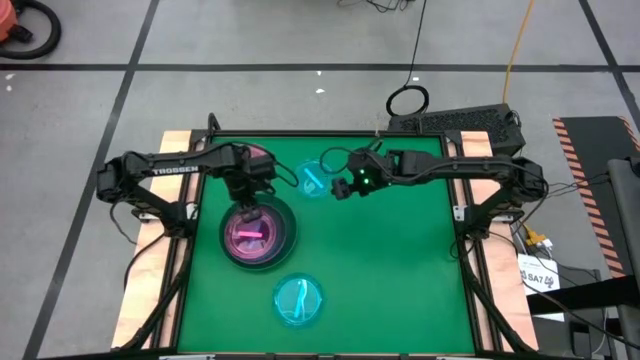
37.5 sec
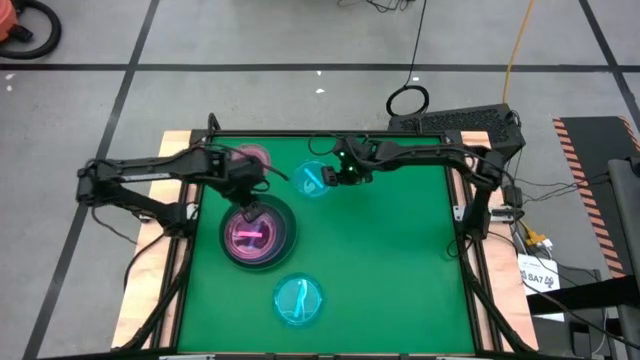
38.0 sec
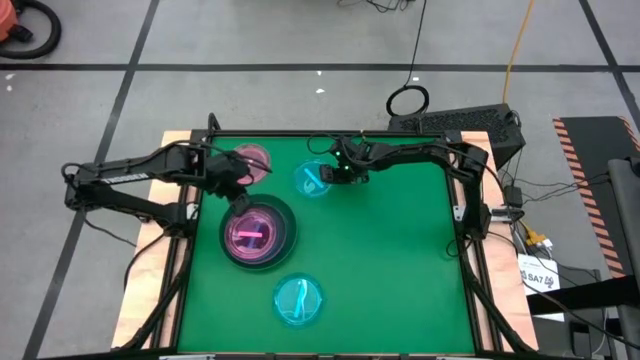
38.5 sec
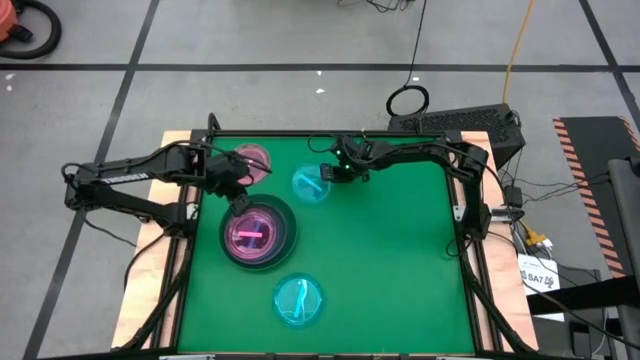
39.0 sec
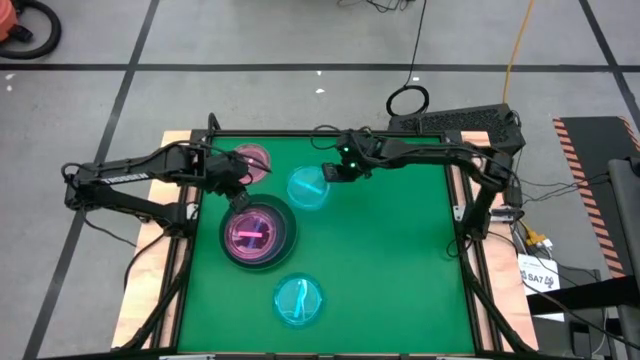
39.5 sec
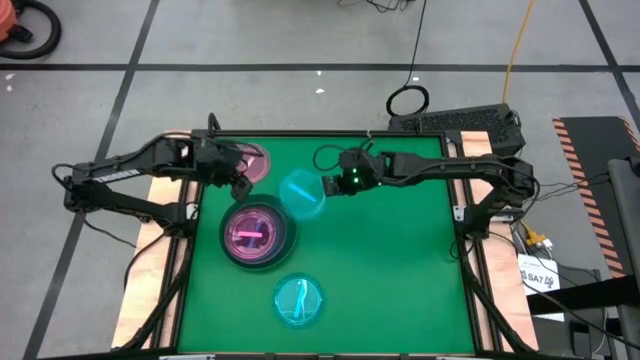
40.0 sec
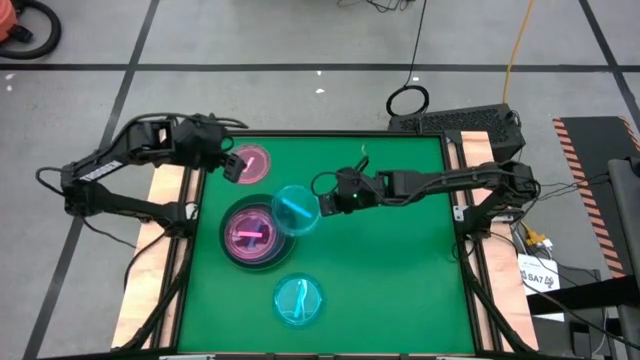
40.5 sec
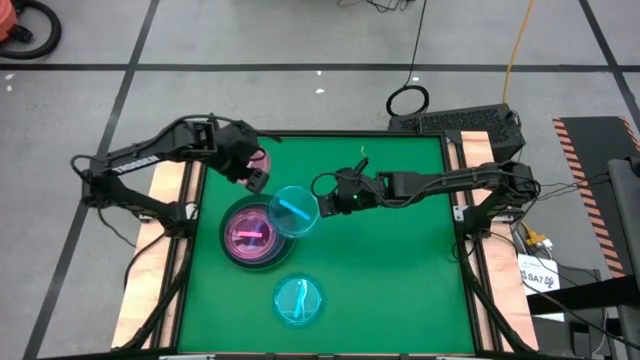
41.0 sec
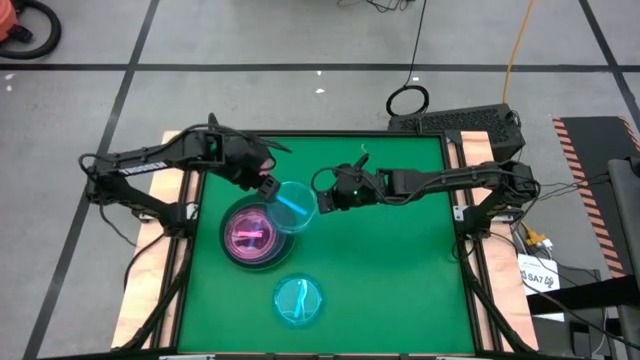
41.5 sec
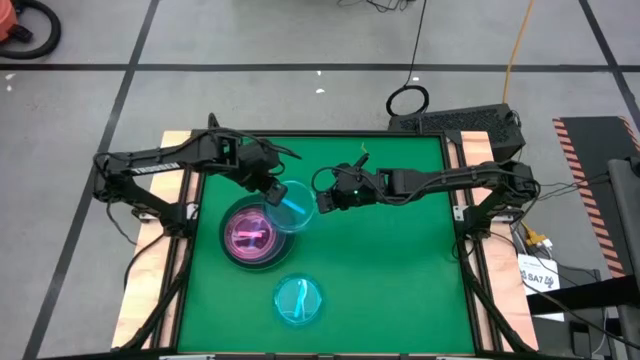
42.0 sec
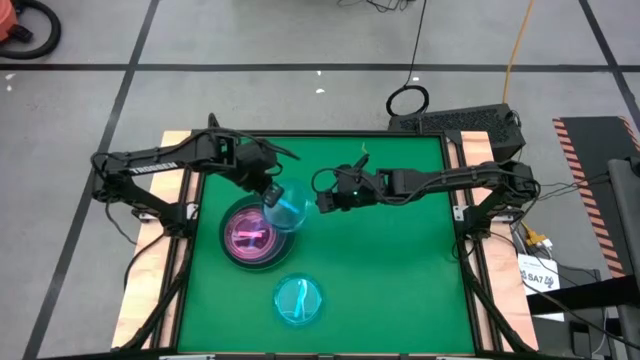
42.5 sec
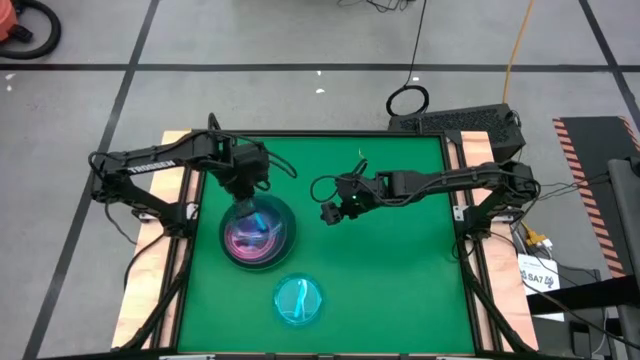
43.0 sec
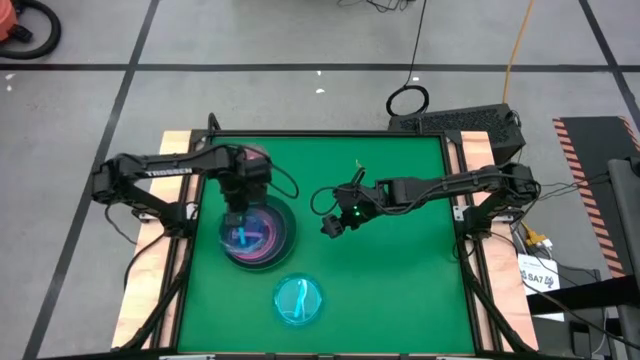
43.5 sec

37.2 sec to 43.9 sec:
Task: Stack plastic plates
Stack the top transparent blue plate on top of the transparent pink plate

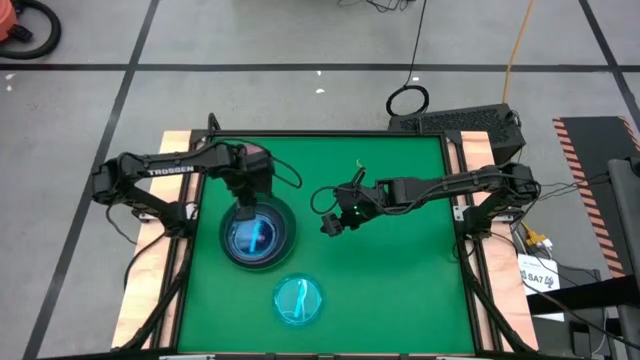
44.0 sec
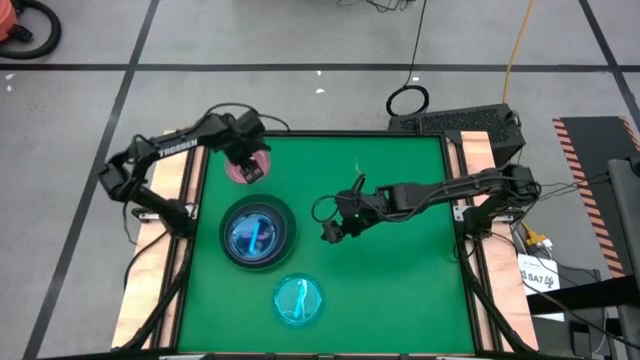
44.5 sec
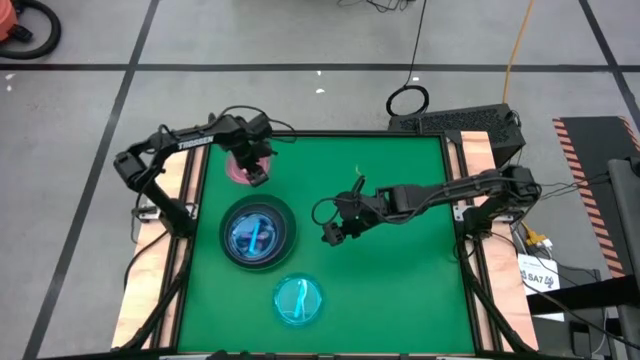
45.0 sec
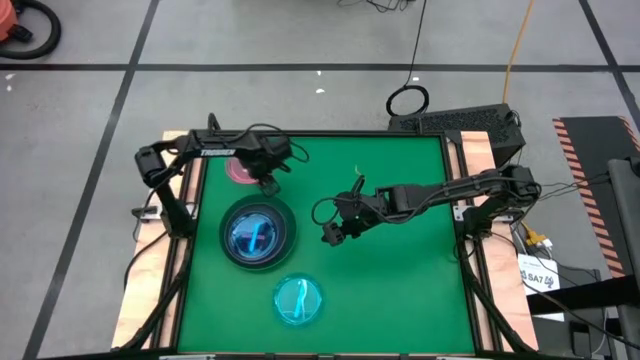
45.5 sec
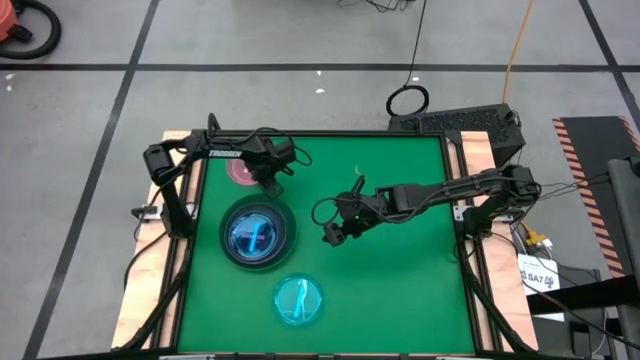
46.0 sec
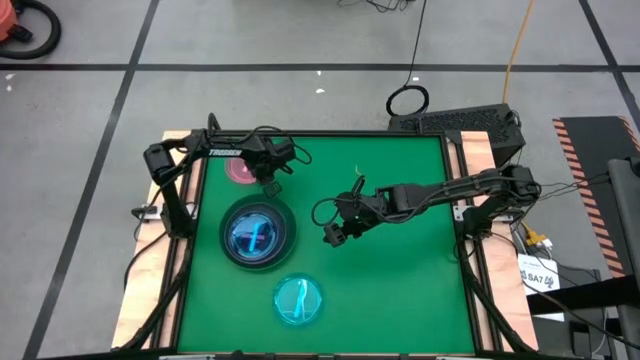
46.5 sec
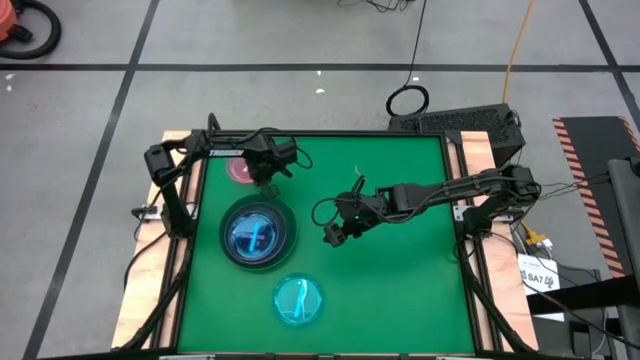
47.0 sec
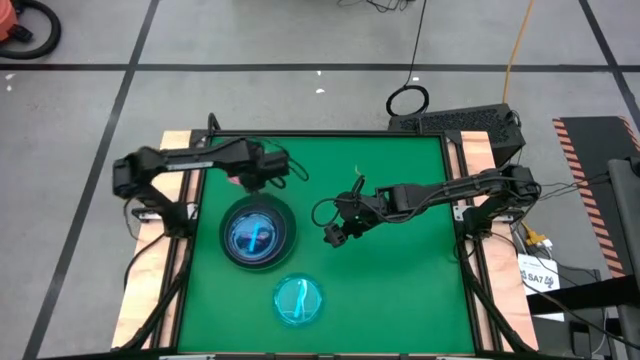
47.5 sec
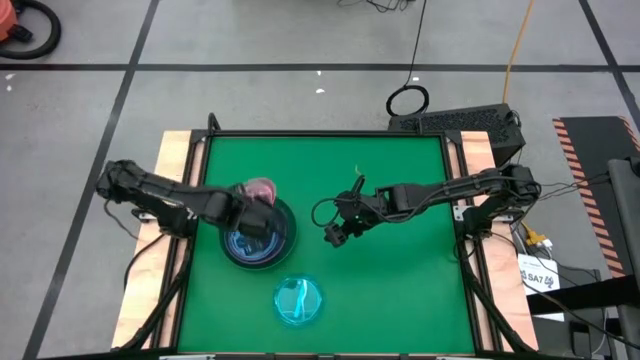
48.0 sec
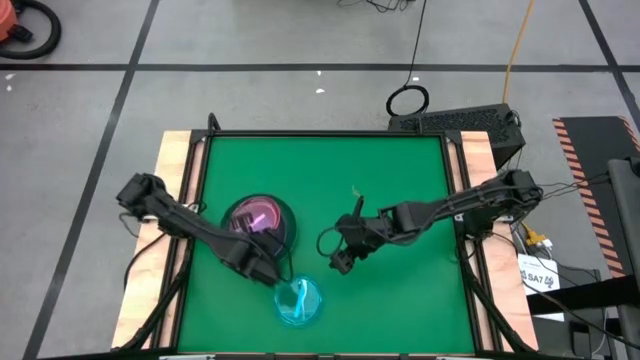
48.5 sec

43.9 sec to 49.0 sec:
Stack the transparent pink plate on top of the transparent blue plate

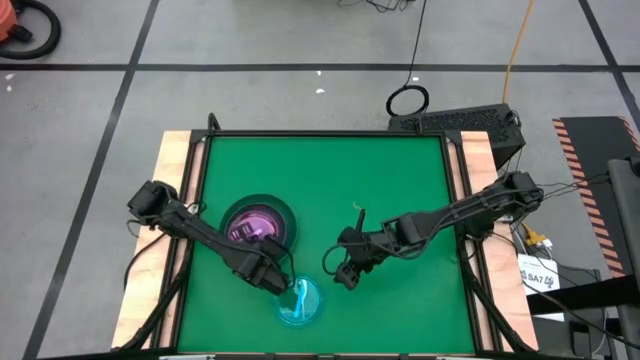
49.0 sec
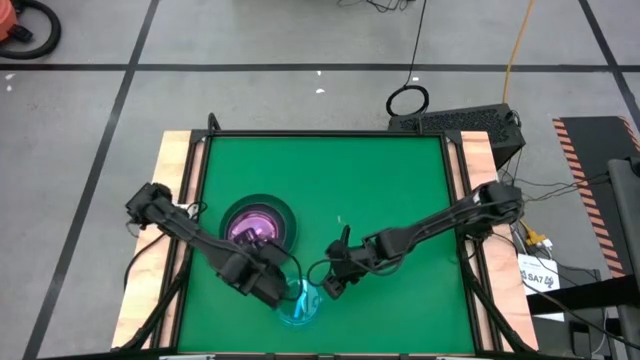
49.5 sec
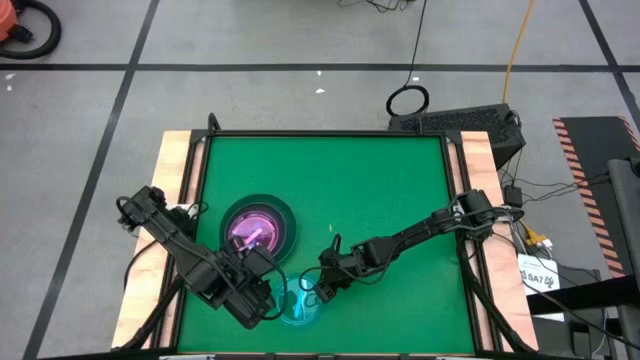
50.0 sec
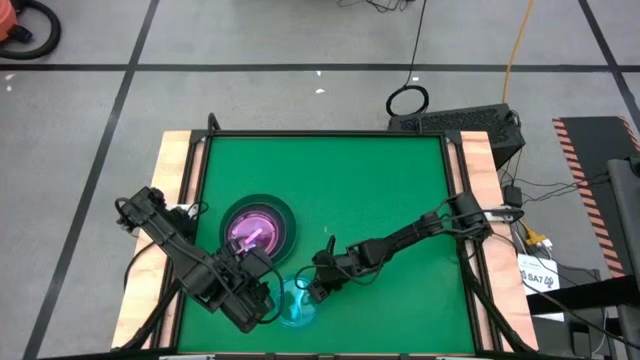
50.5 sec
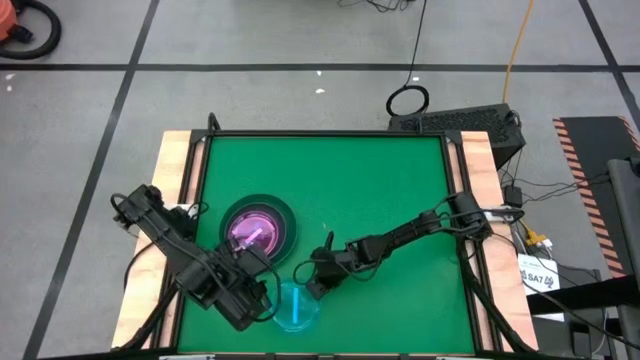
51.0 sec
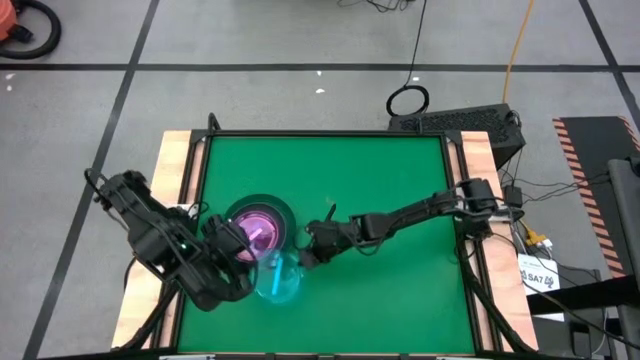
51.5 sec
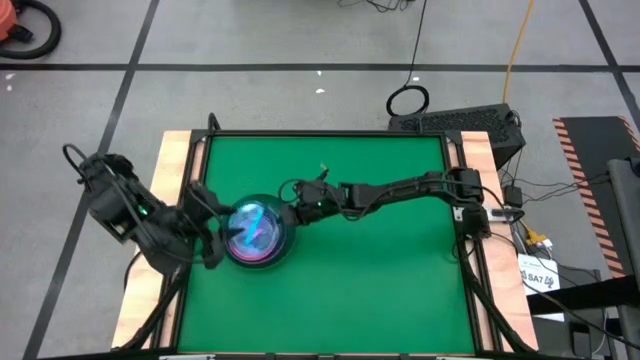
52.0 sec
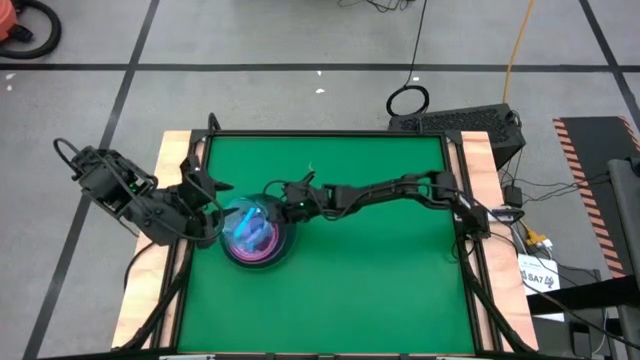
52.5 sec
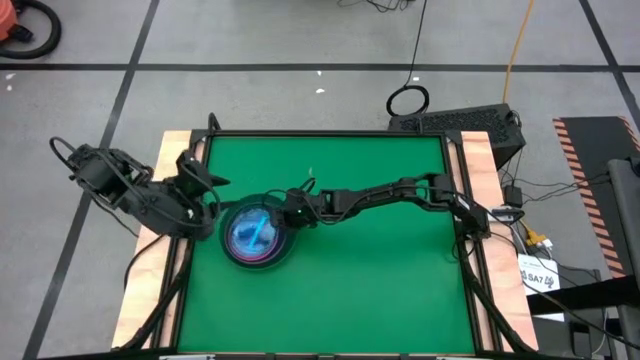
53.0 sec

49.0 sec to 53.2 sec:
Stack the transparent blue plate on top of the transparent pink plate

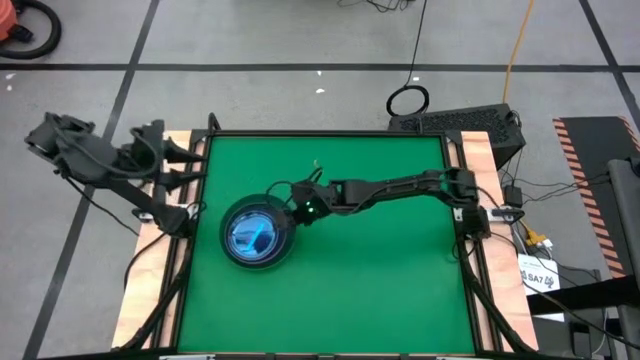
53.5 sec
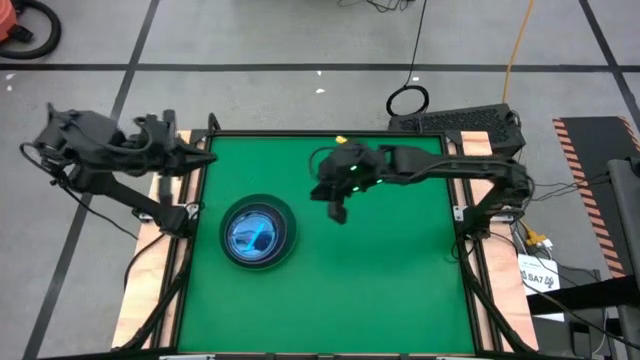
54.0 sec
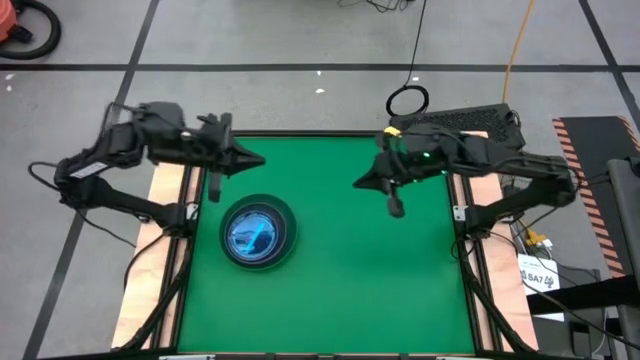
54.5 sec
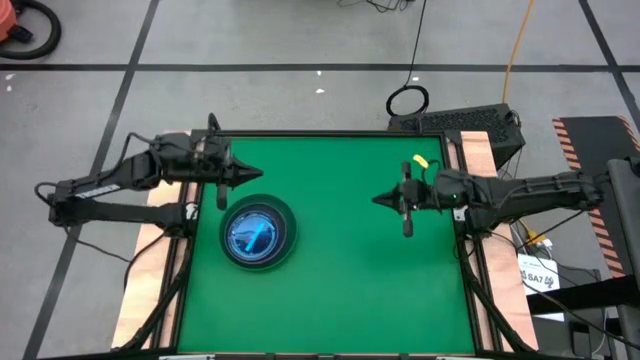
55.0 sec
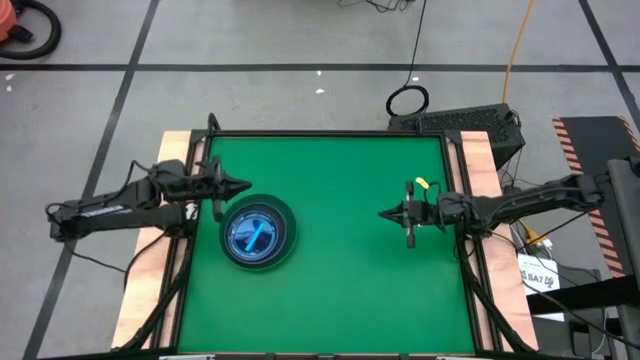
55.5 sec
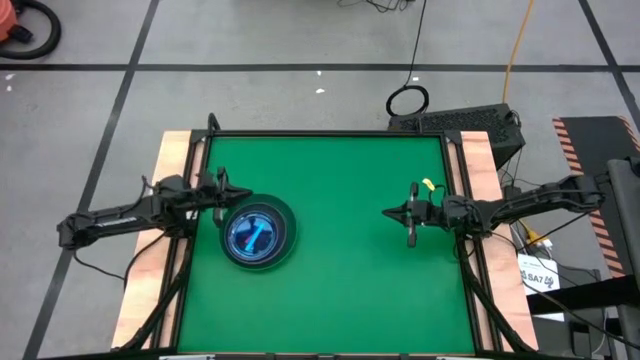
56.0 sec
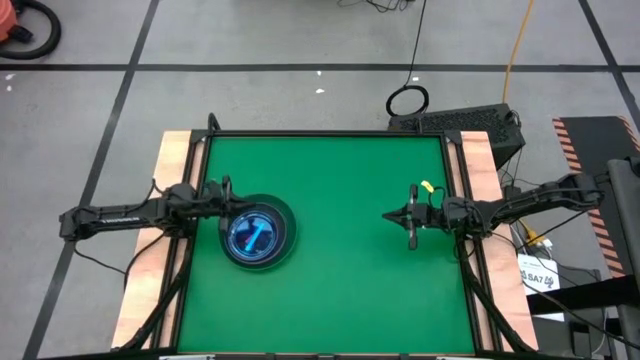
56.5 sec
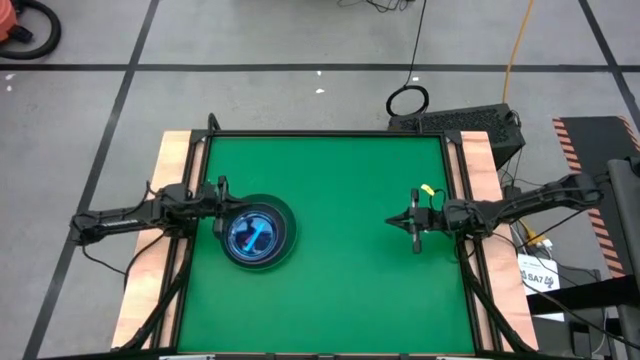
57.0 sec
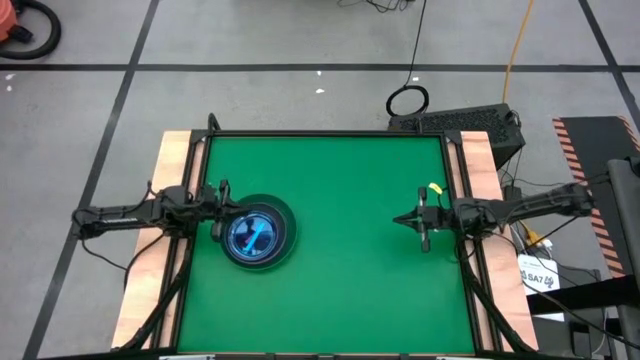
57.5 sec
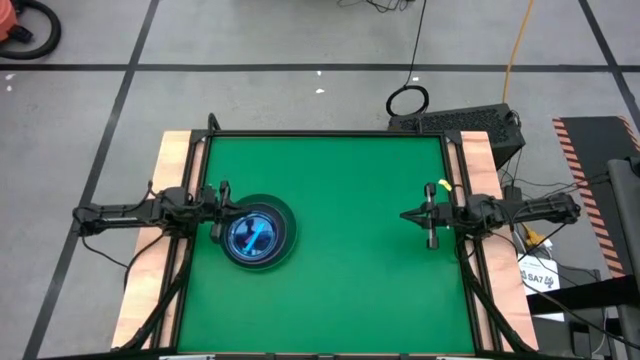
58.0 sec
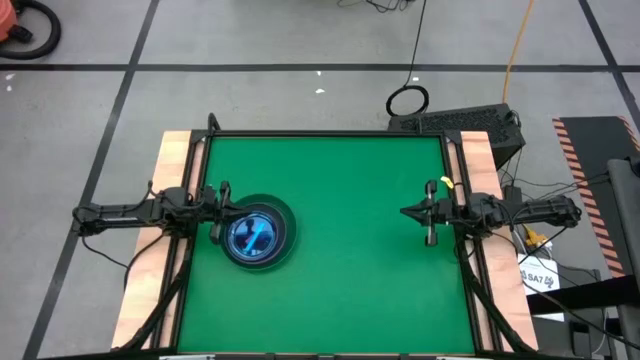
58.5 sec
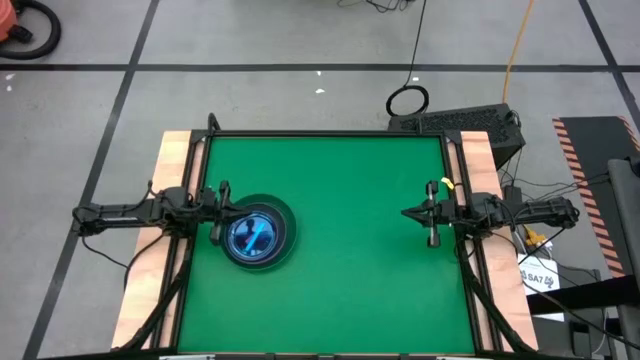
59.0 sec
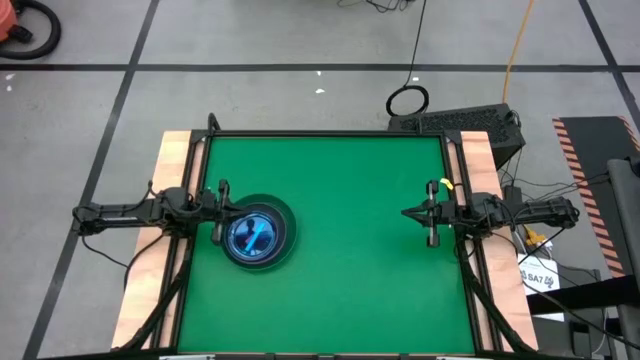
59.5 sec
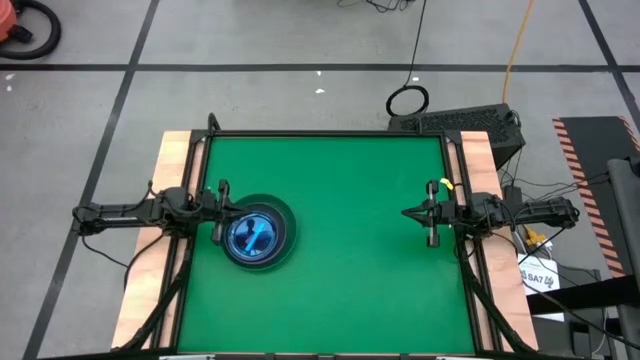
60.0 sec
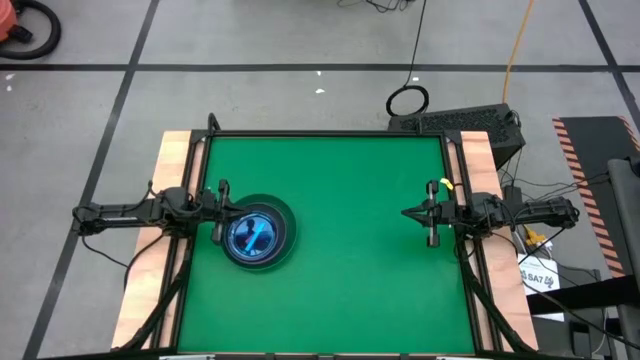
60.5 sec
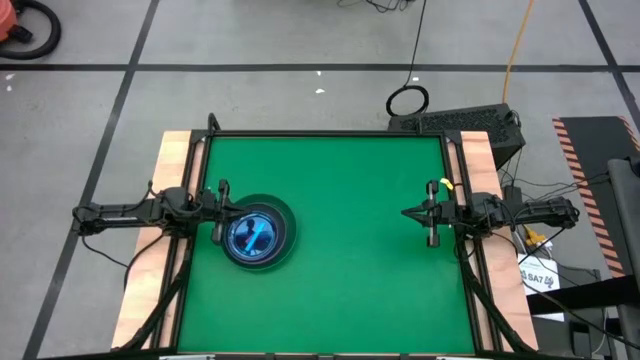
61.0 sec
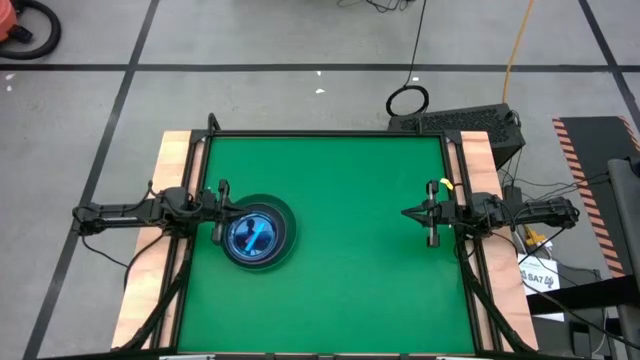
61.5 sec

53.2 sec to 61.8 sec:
Return to Home Position
